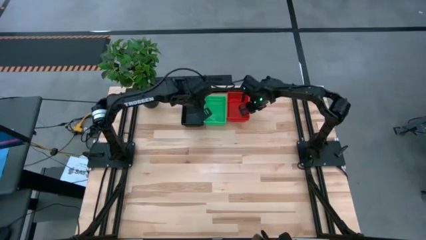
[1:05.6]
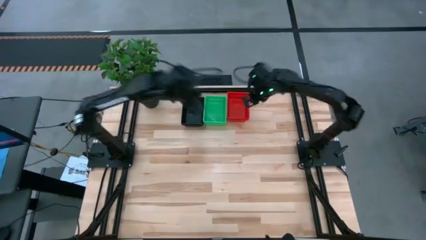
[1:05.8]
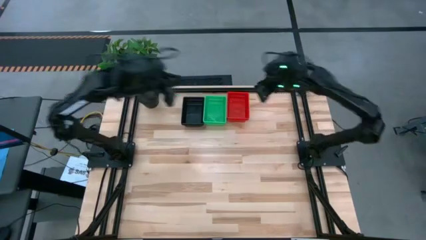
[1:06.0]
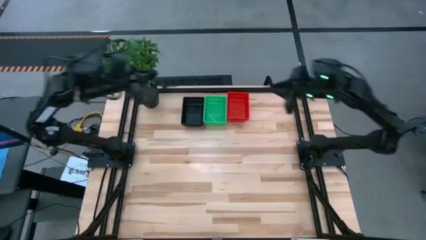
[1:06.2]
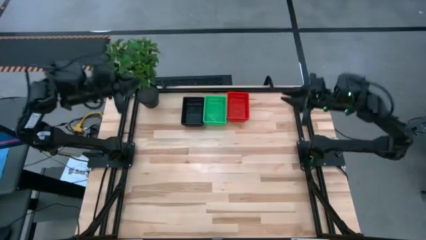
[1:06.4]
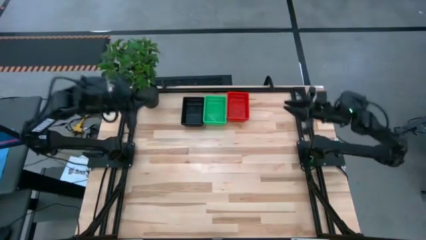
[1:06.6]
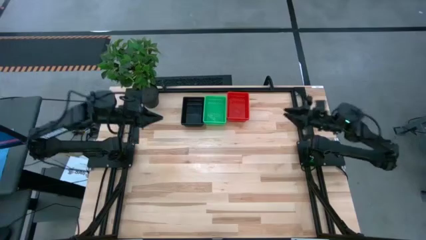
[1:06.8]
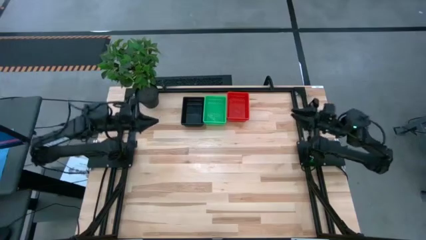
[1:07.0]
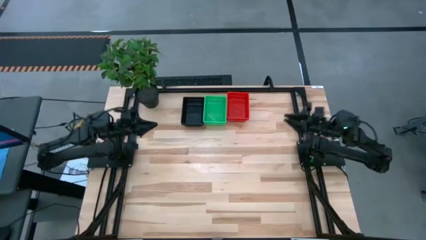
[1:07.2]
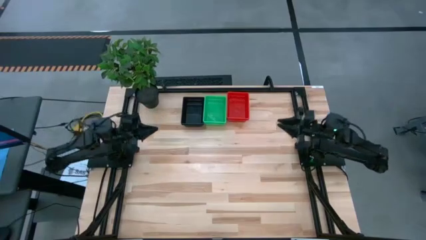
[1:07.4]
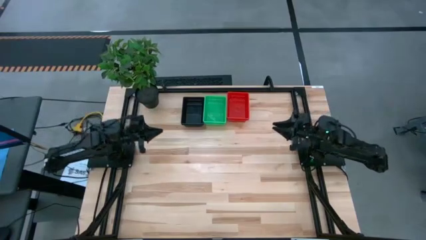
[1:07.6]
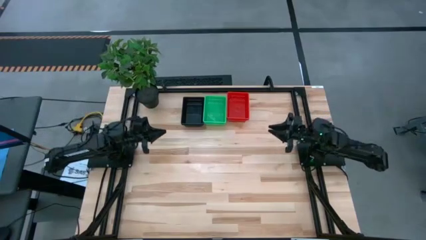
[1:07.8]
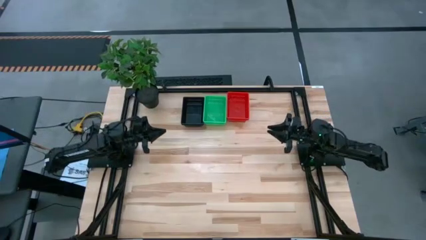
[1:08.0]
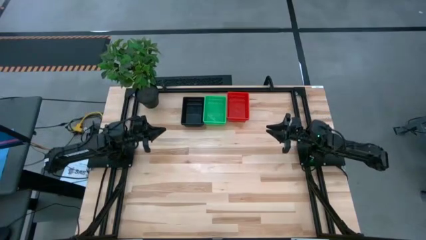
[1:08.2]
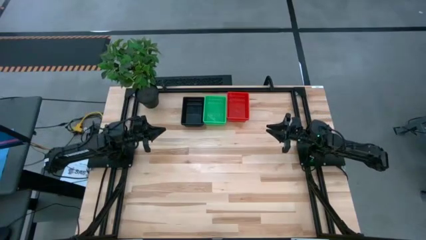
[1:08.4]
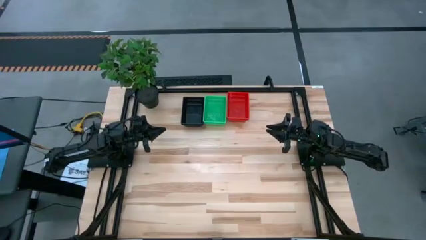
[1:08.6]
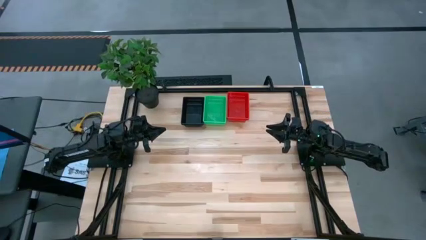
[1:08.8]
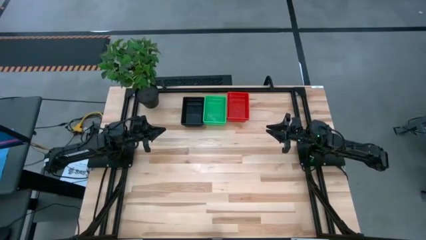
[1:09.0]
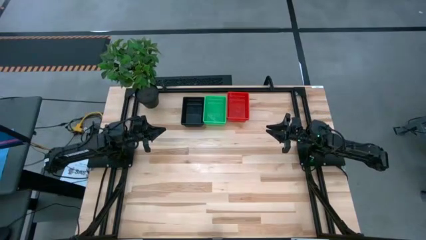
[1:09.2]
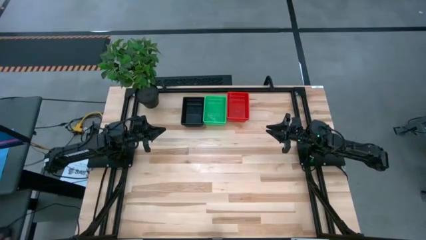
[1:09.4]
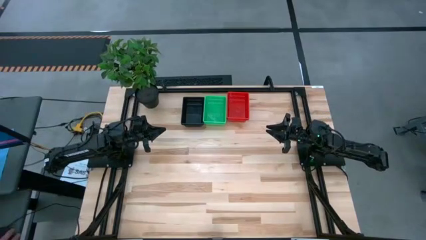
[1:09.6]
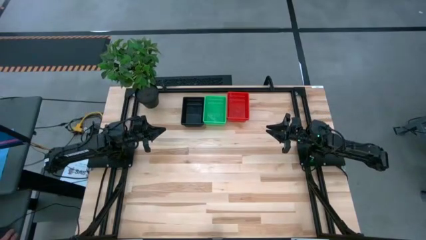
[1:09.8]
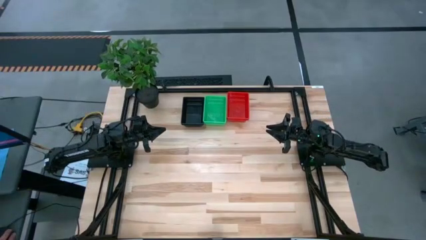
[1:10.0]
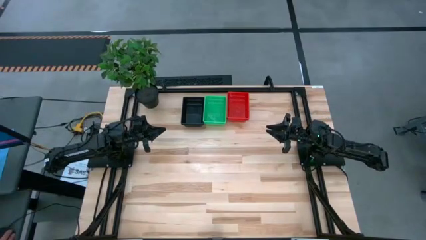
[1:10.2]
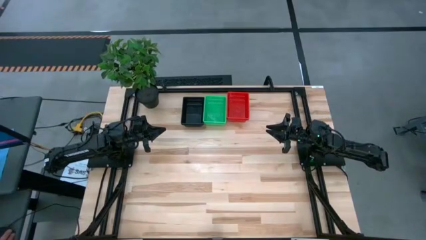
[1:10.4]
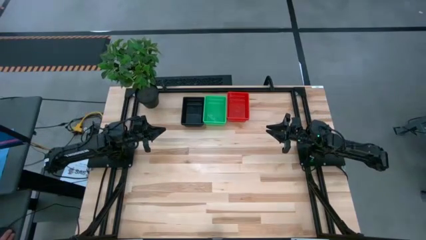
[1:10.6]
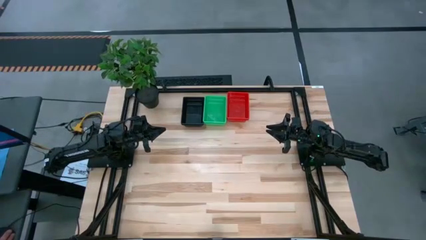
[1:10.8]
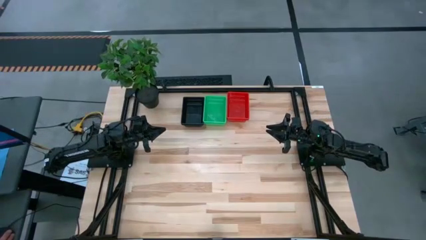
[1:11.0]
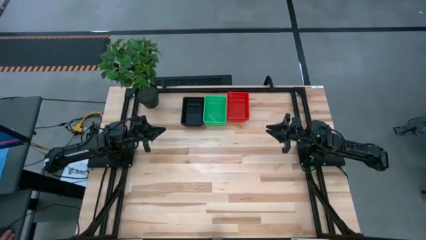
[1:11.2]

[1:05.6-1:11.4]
Return to Home Position

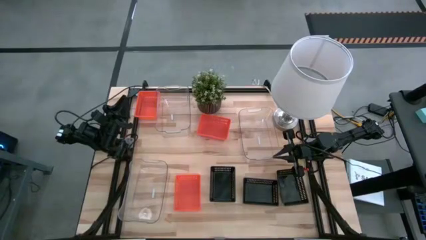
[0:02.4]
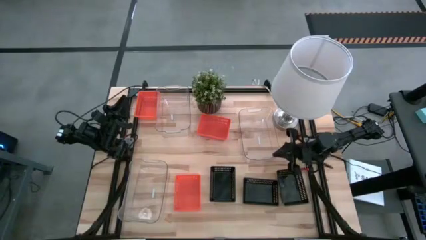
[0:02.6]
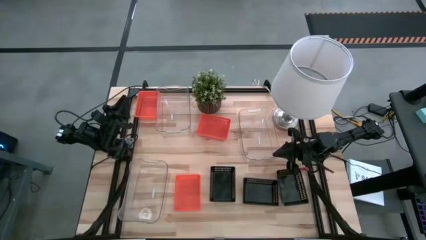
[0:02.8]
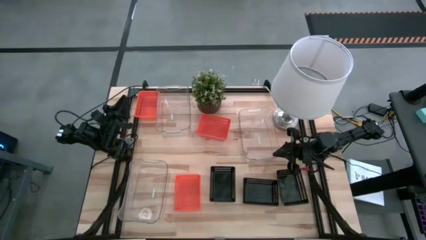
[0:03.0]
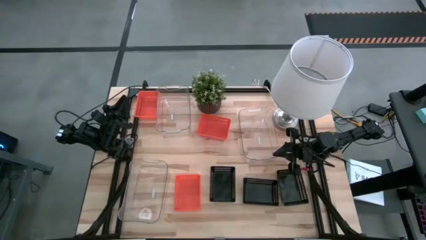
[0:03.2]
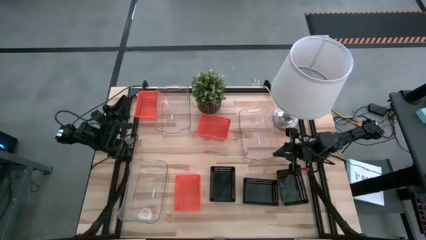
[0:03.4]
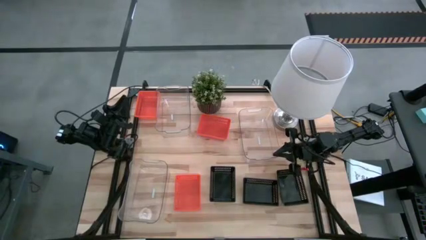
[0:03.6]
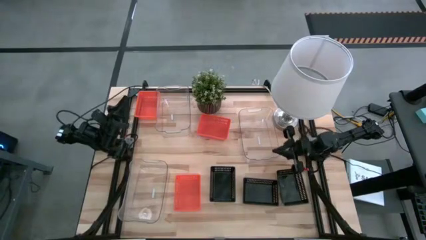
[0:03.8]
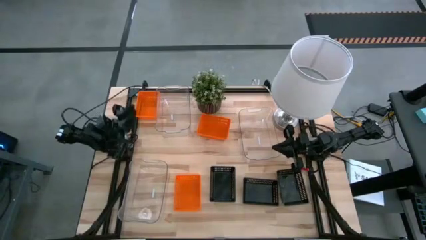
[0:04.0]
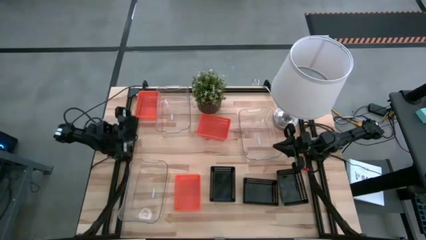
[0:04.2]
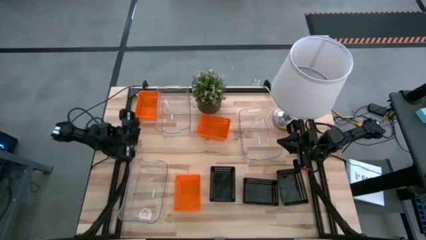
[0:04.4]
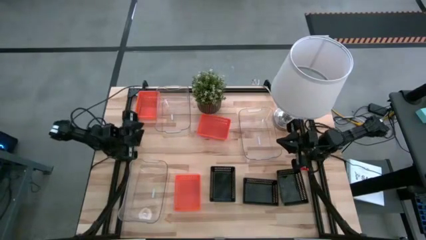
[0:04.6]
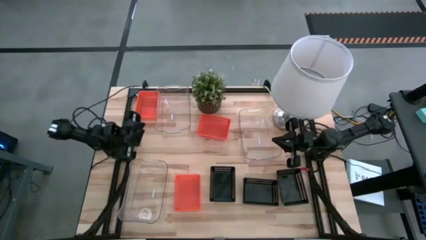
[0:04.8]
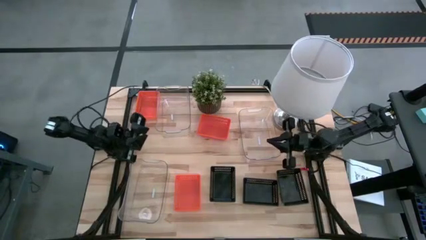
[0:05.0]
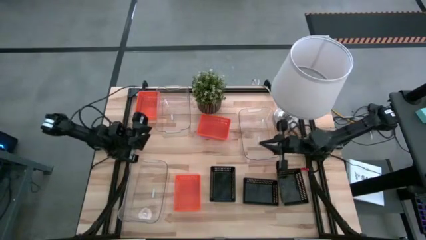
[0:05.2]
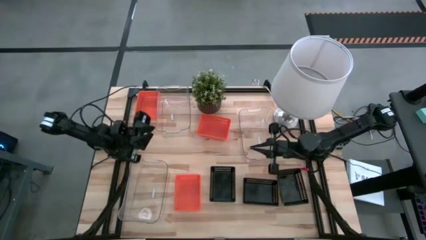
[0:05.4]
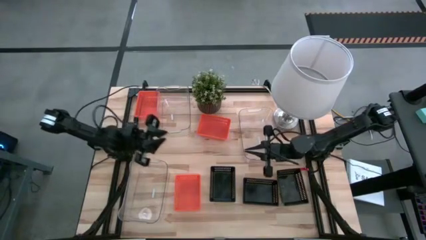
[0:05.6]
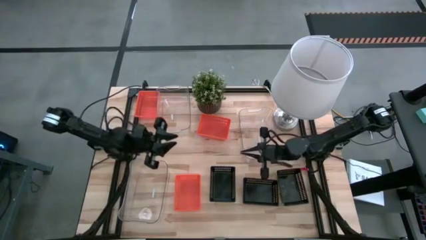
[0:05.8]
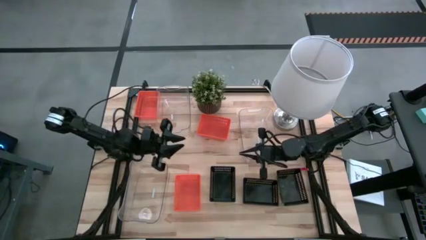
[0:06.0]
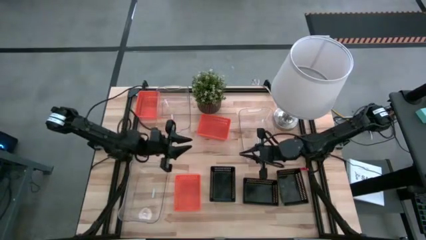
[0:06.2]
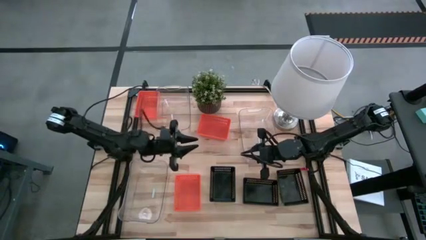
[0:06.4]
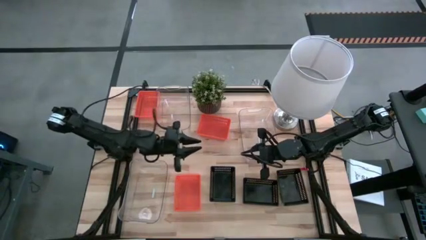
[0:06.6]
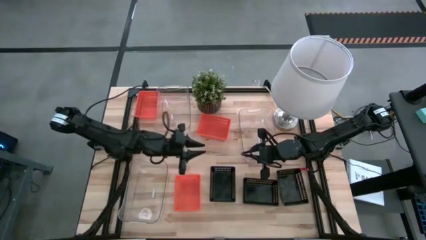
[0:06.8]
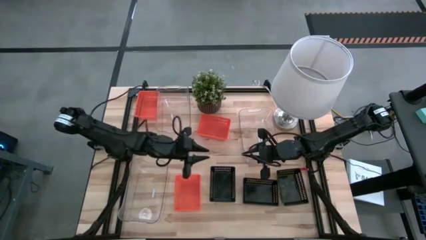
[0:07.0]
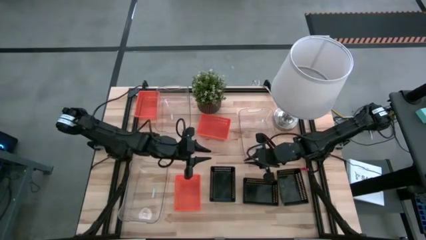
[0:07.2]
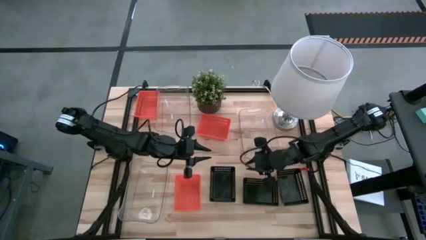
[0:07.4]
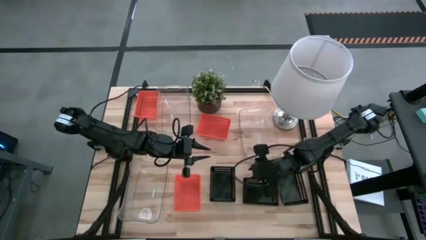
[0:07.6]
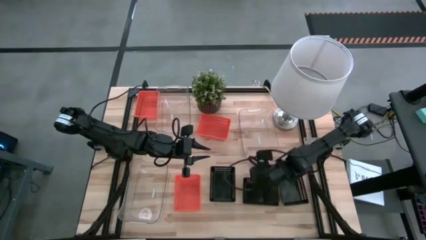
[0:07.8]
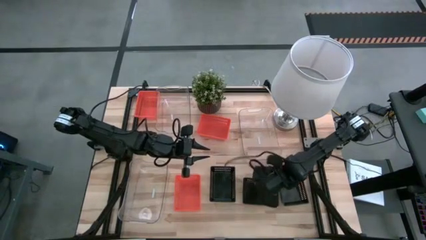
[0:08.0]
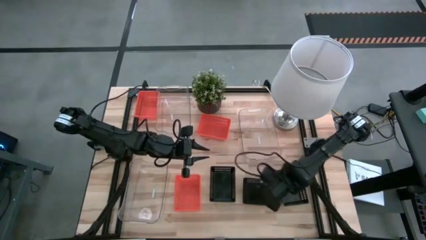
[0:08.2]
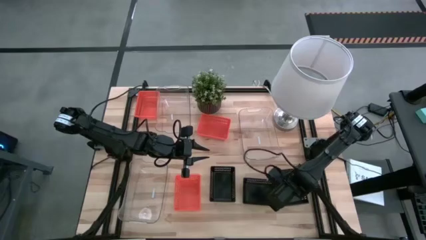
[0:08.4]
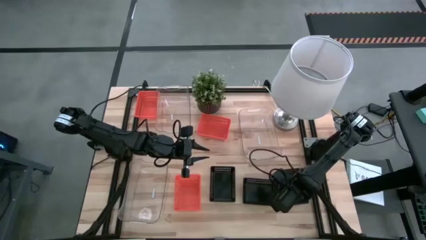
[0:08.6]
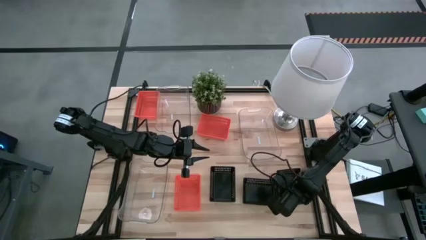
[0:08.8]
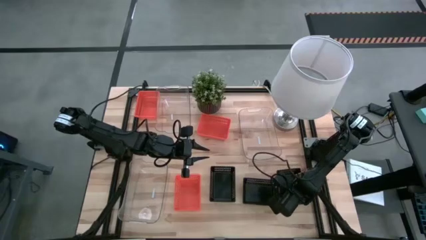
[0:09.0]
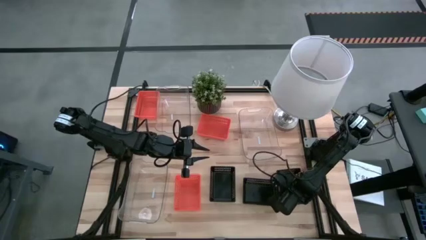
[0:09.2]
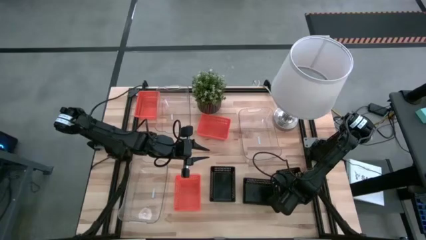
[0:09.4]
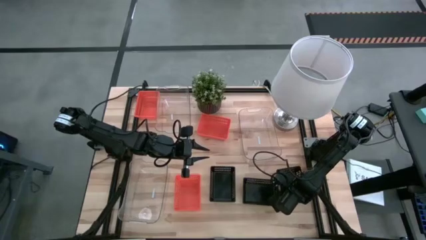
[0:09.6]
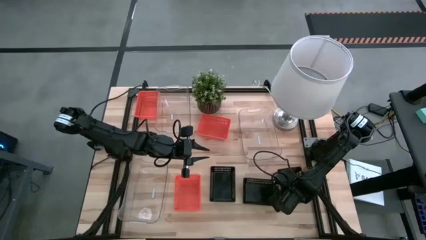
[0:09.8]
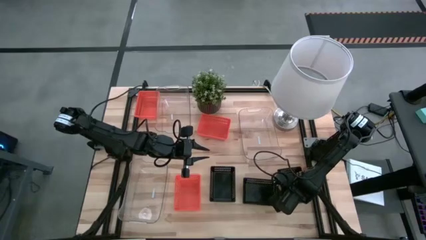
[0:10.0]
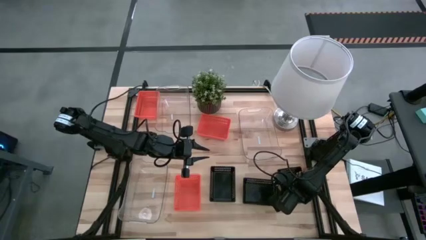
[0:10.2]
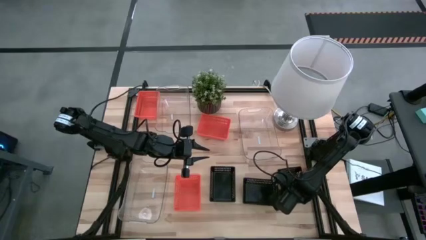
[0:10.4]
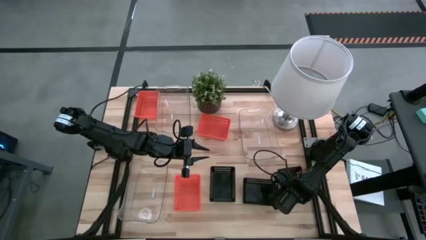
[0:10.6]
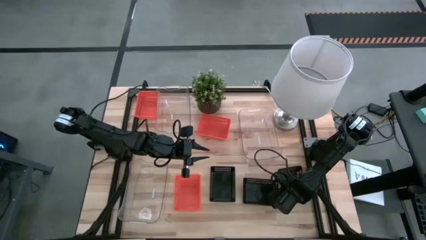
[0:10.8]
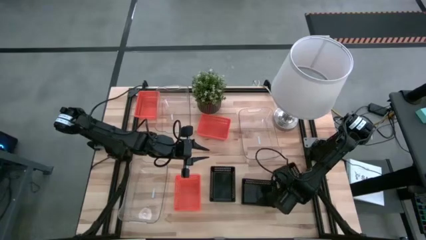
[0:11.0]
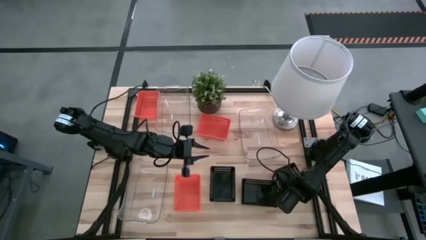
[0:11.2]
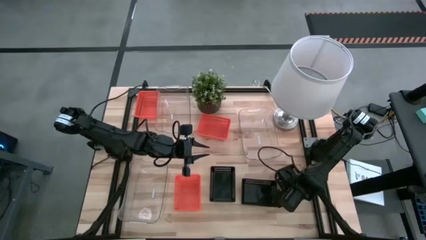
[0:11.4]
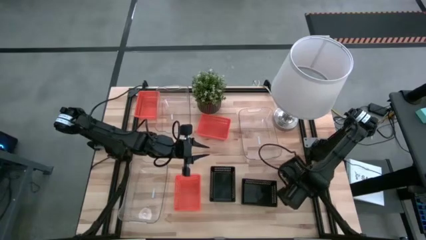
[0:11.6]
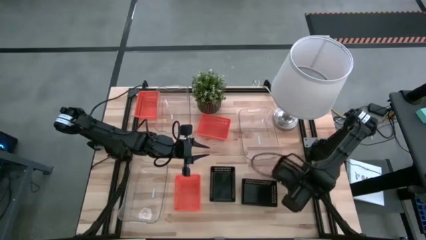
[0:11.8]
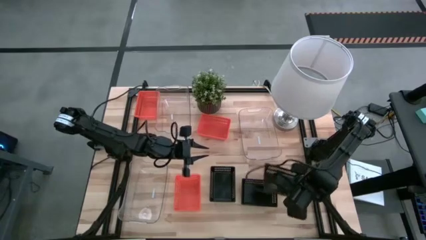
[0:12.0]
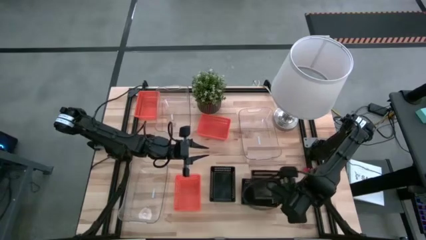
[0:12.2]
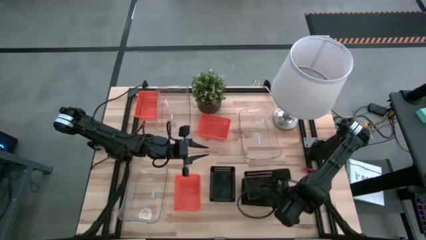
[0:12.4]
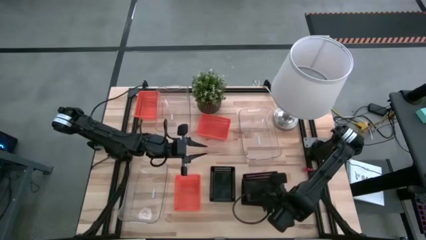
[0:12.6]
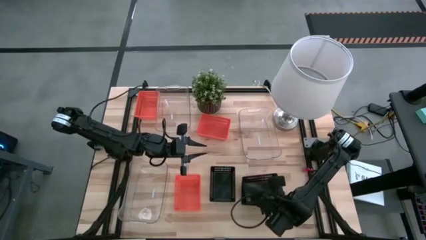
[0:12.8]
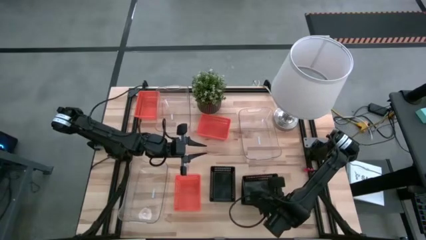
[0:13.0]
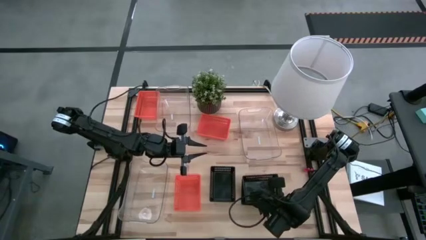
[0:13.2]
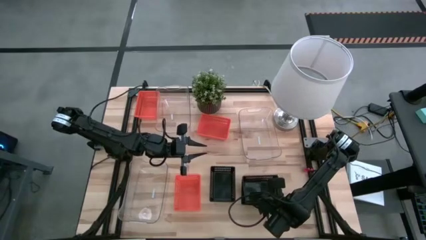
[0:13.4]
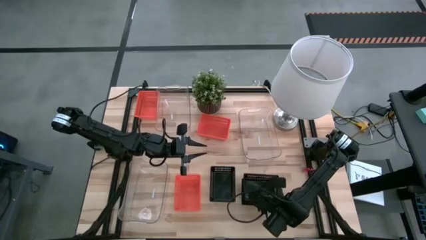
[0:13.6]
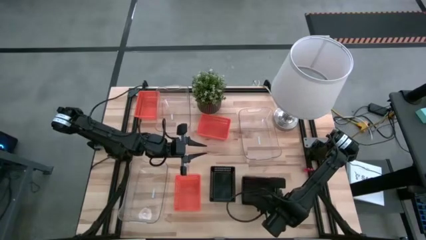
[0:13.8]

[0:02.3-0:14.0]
Stack the right black bin on the middle black bin
